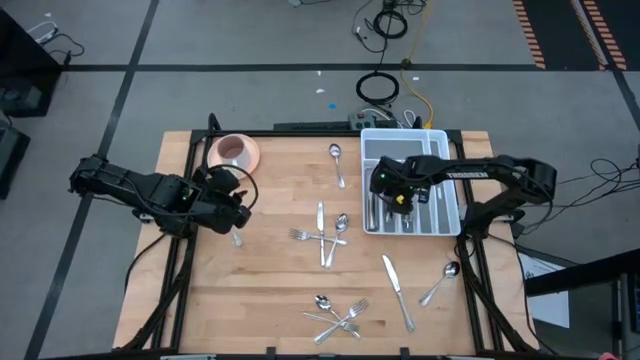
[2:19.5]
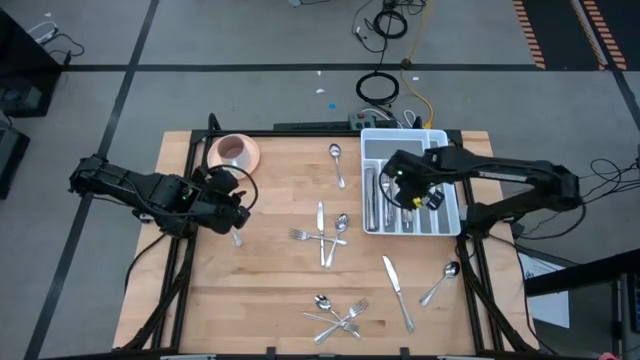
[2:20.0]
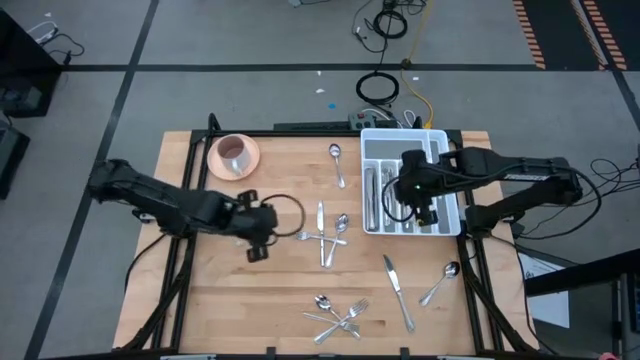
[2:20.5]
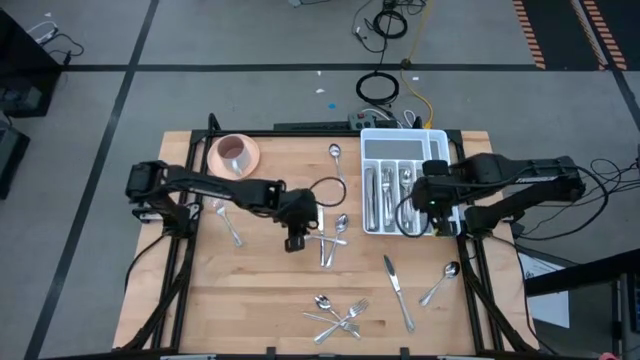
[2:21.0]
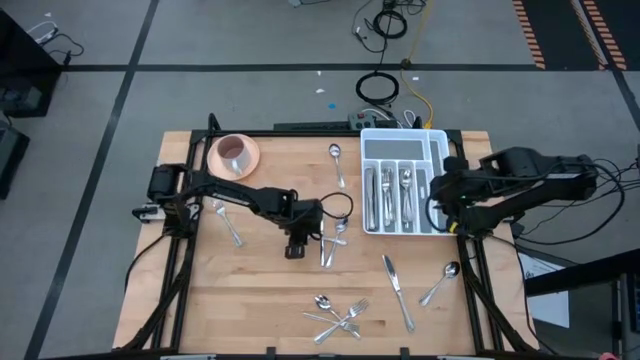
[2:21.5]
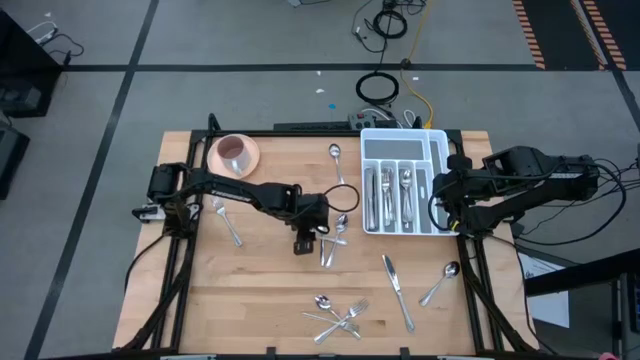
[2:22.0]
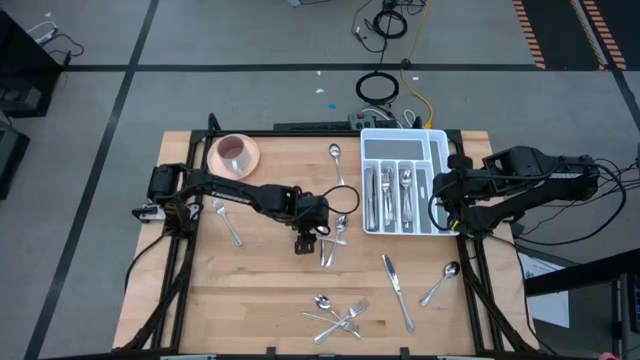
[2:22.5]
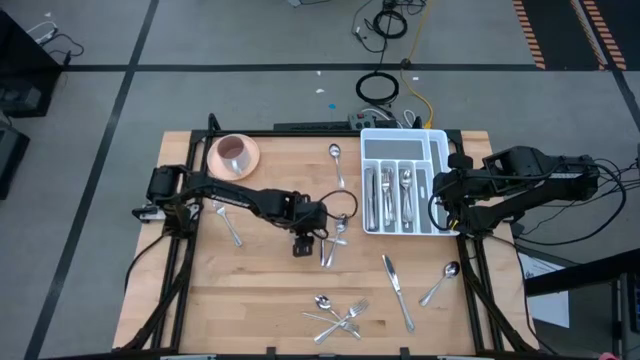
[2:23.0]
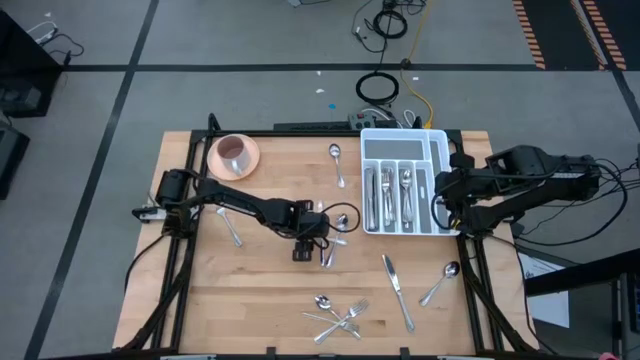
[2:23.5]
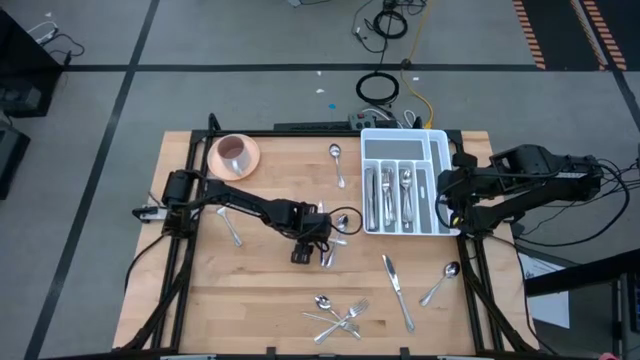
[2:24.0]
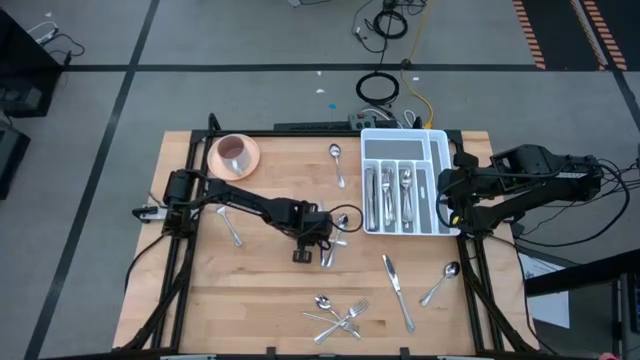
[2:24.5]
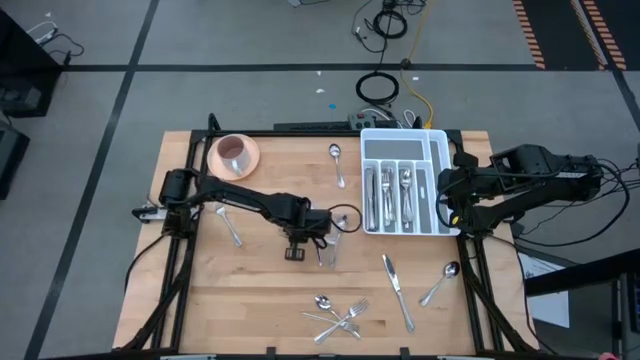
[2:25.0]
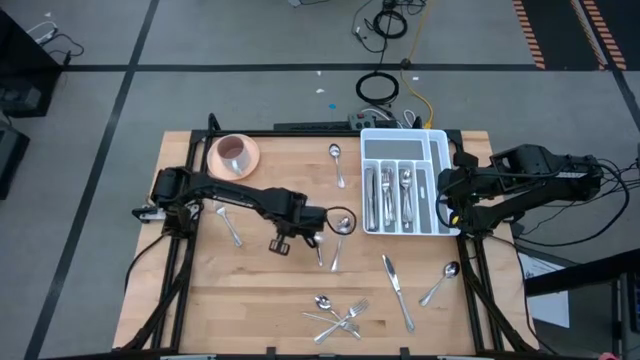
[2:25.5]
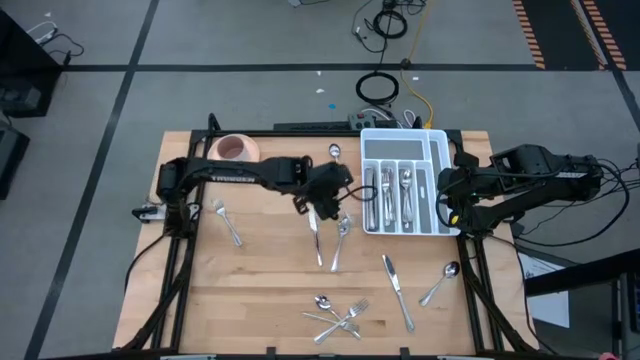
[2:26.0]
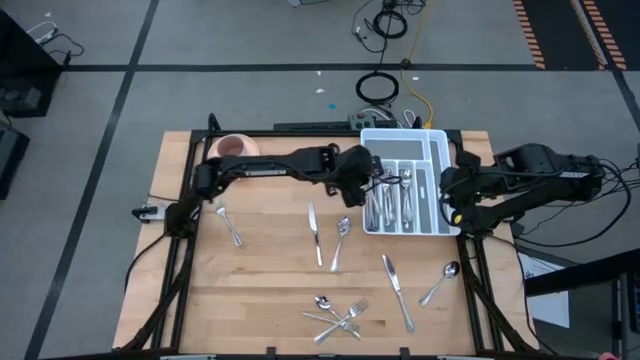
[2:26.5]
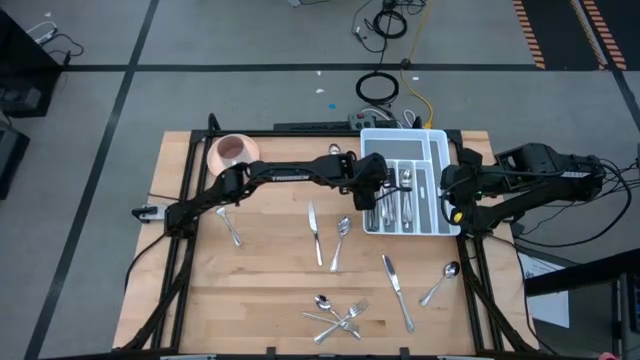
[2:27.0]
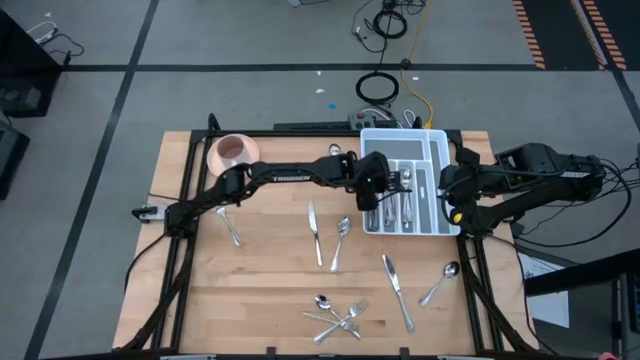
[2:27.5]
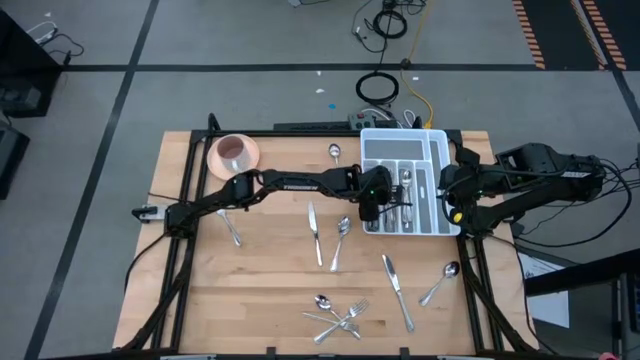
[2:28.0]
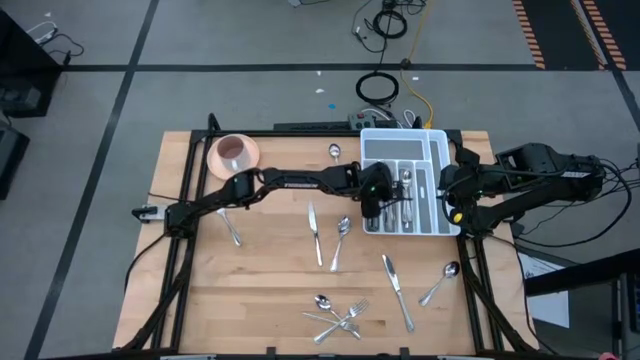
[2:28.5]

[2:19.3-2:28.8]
Task: Sort silverware
Put the silver fork into the white cutlery tray

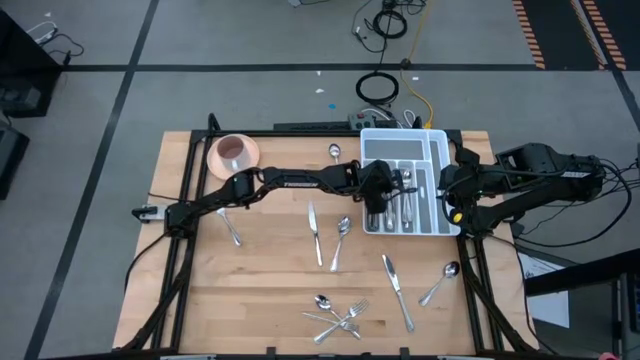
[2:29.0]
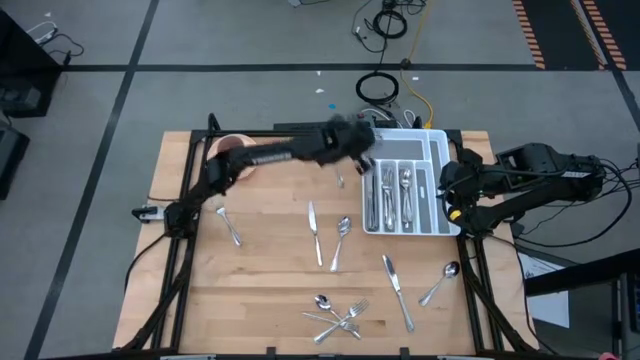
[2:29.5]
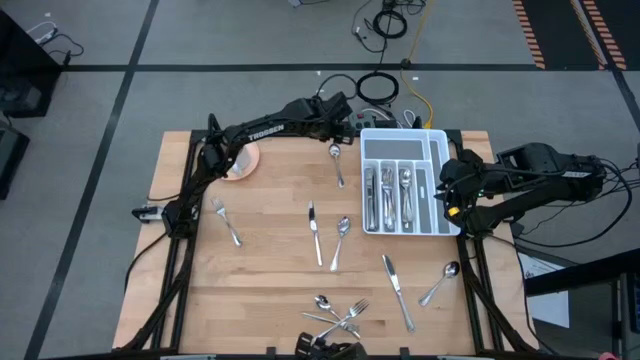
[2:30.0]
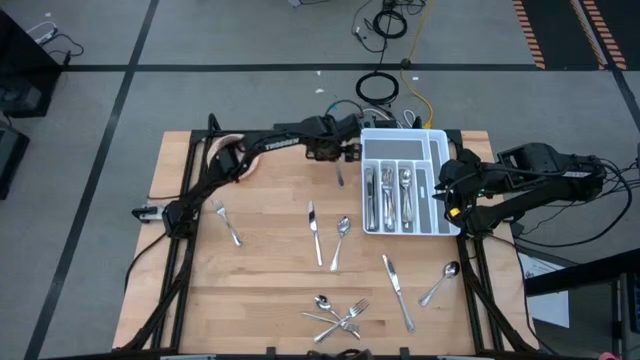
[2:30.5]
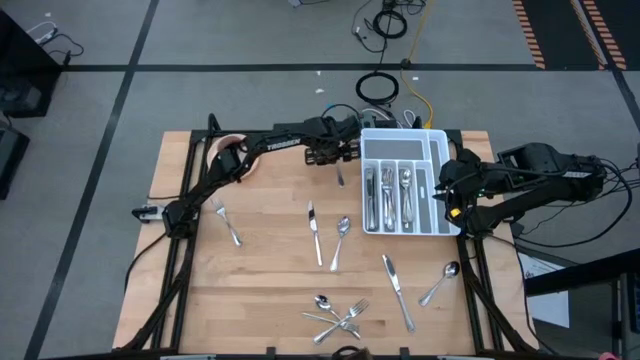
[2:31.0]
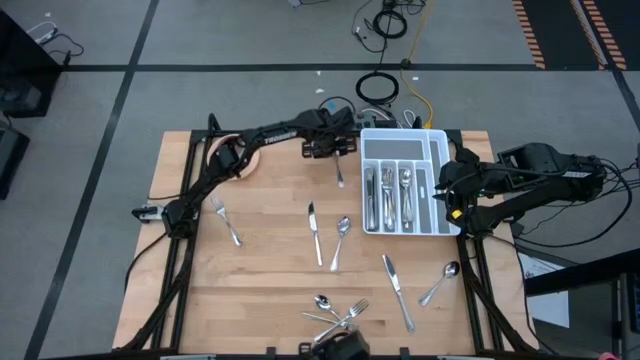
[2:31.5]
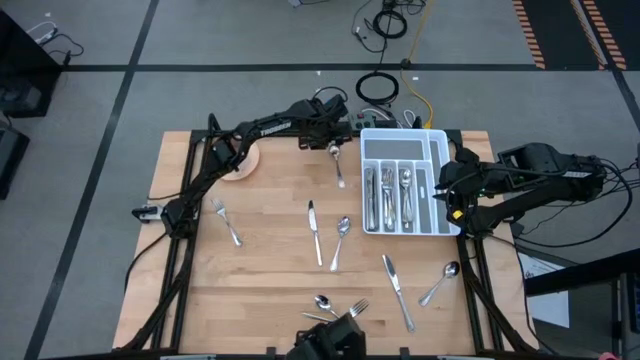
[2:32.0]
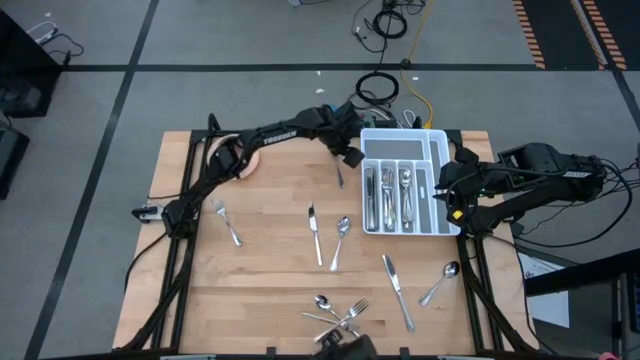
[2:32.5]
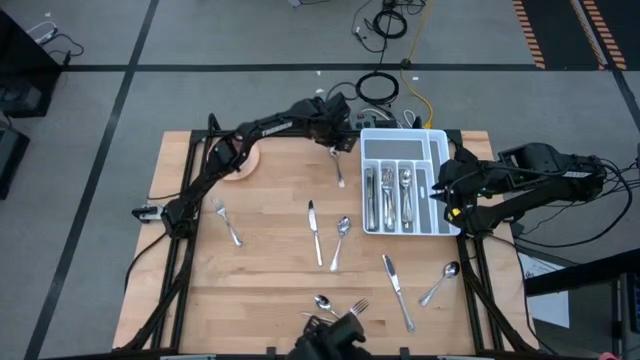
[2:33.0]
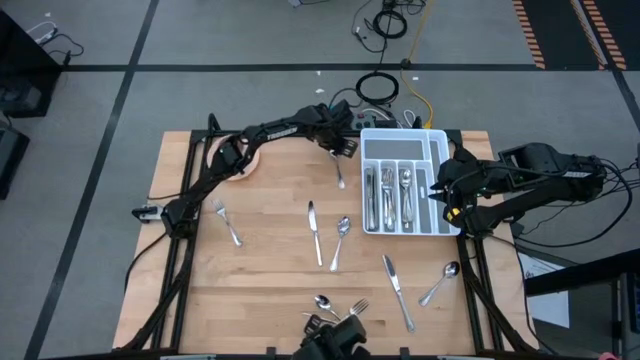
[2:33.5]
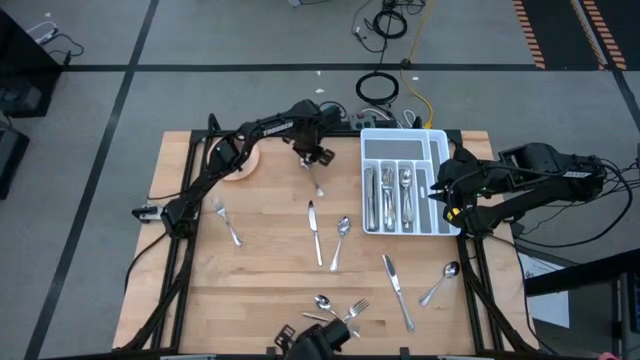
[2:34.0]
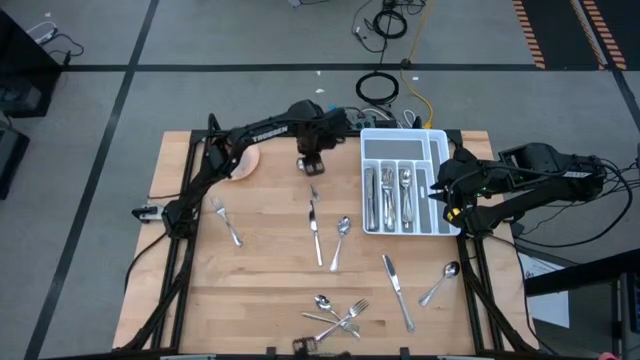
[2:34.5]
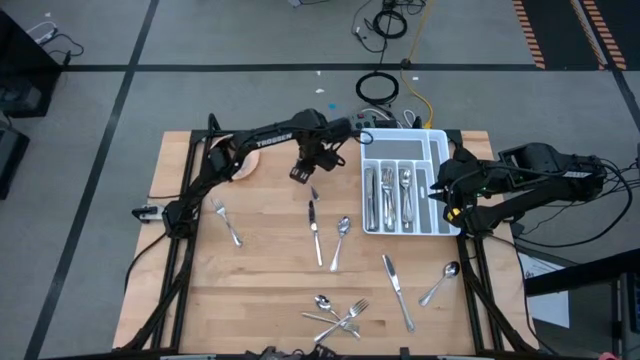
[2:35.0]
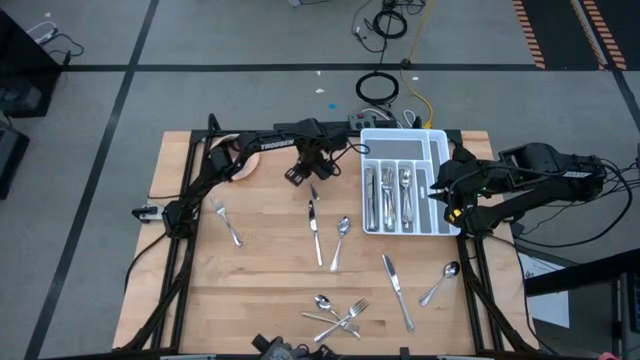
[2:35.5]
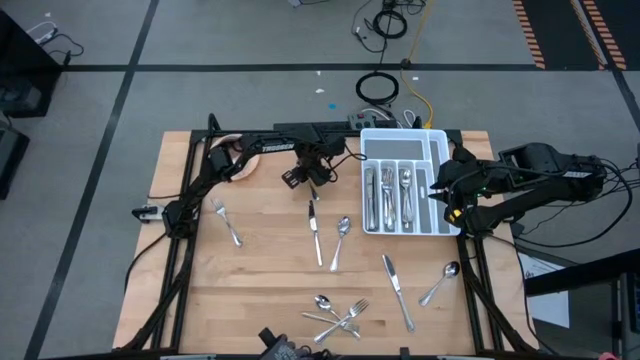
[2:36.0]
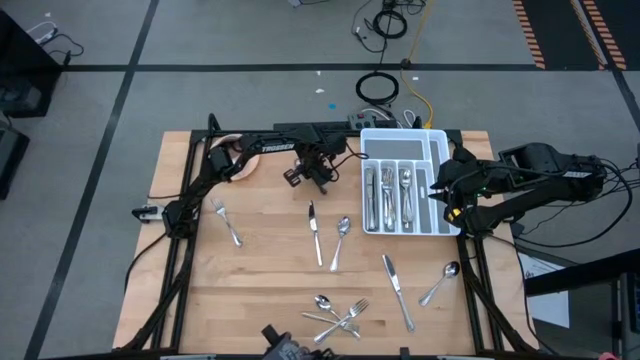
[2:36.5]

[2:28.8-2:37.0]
Put the silver spoon into the white cutlery tray

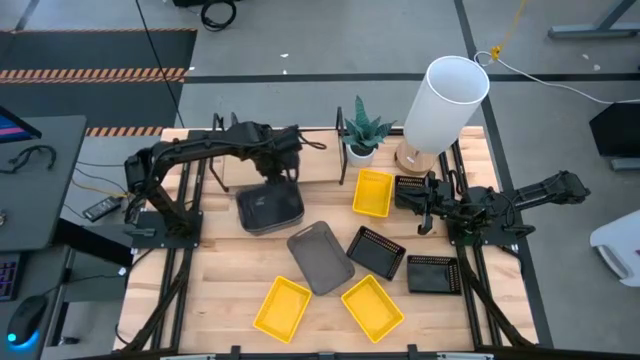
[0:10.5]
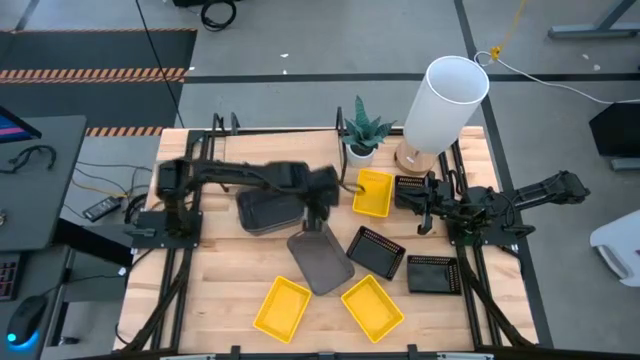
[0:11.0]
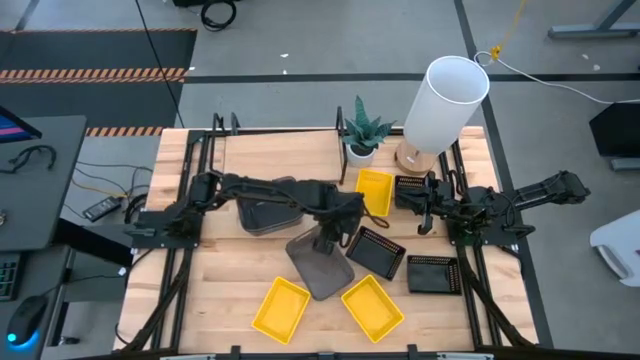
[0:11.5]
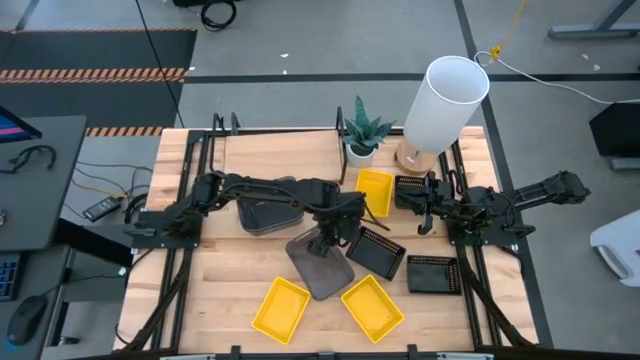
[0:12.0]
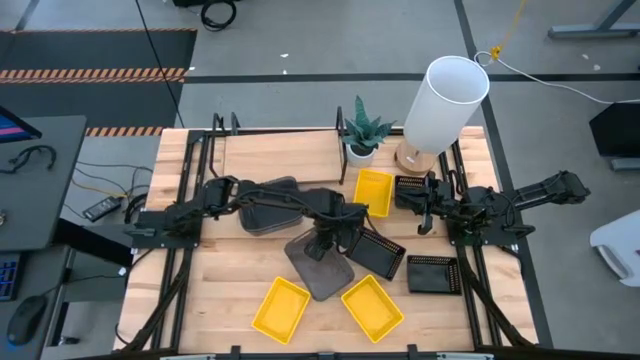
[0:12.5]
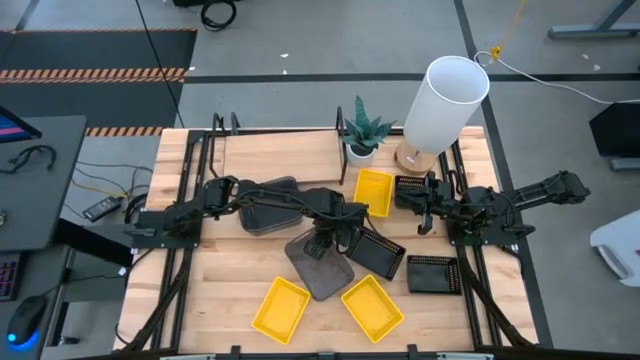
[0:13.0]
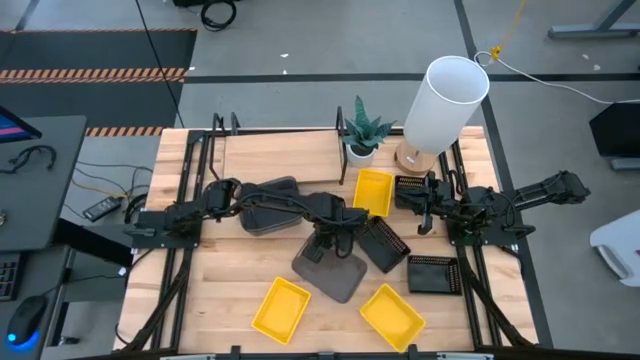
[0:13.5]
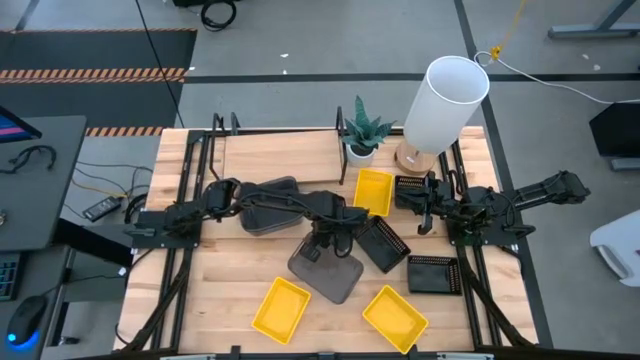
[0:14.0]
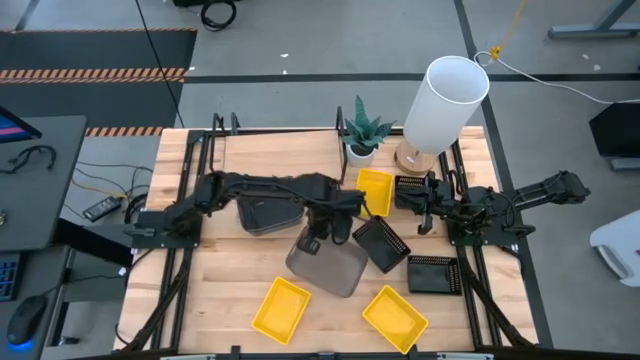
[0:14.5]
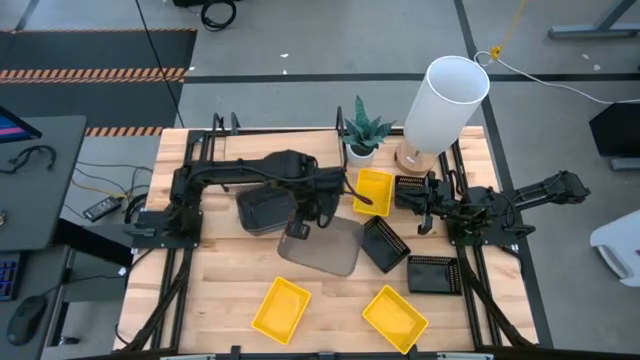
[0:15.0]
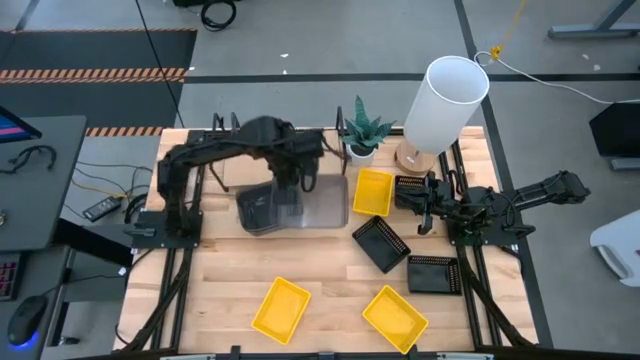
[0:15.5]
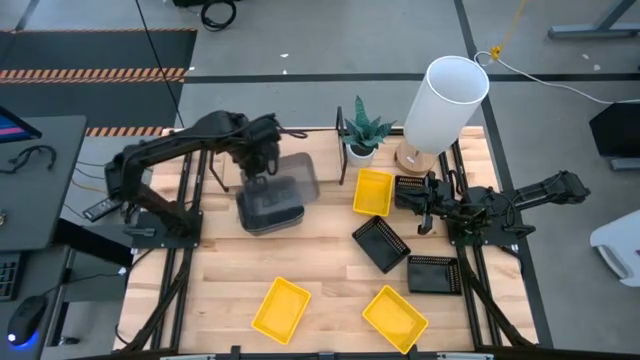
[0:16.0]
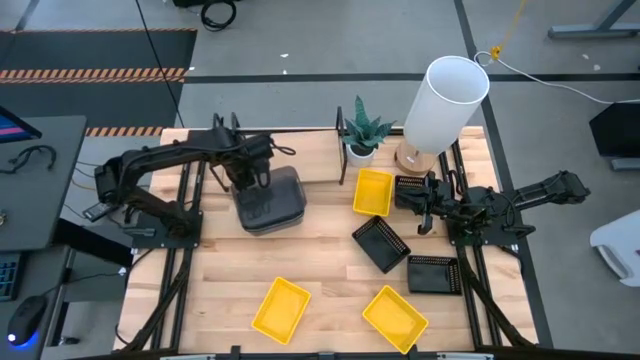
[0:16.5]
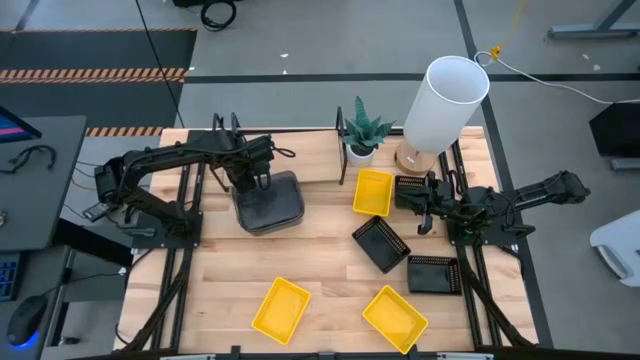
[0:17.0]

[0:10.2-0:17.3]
Task: Stack baskets on shelf by color
Stack the bottom gray bin on the top gray bin
